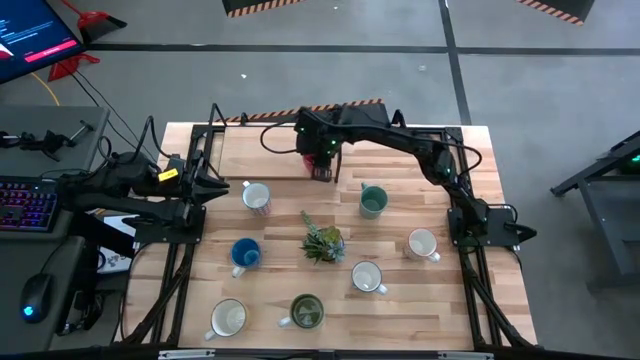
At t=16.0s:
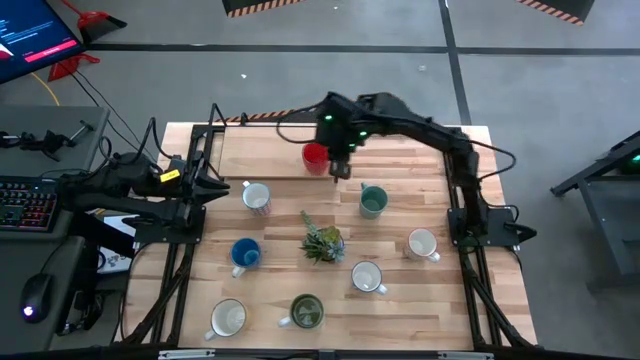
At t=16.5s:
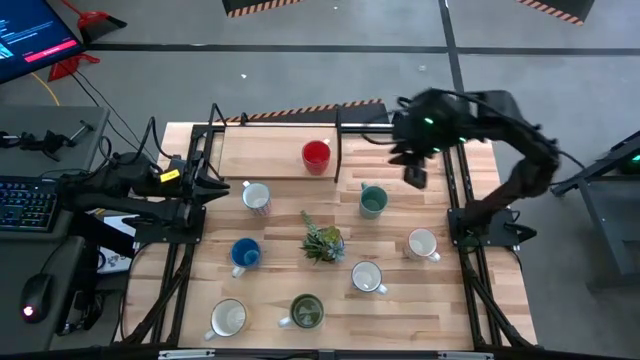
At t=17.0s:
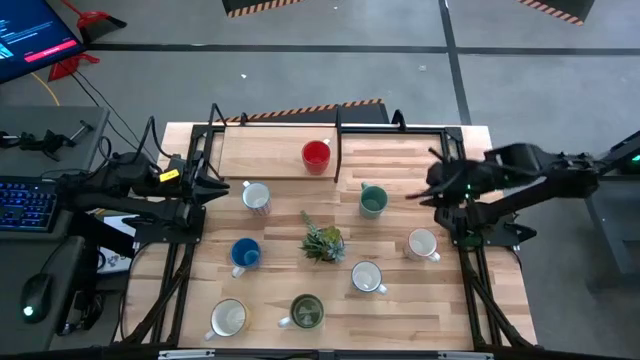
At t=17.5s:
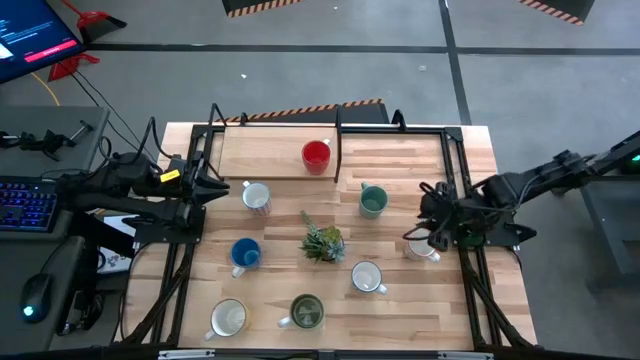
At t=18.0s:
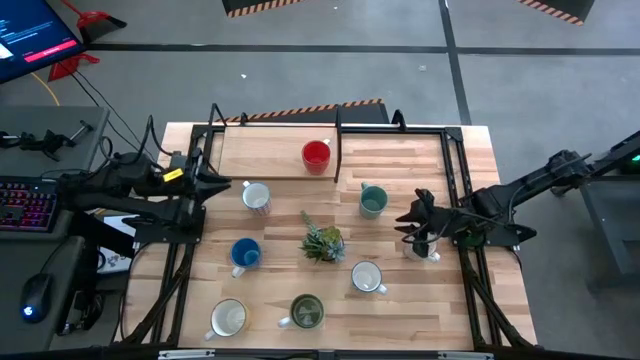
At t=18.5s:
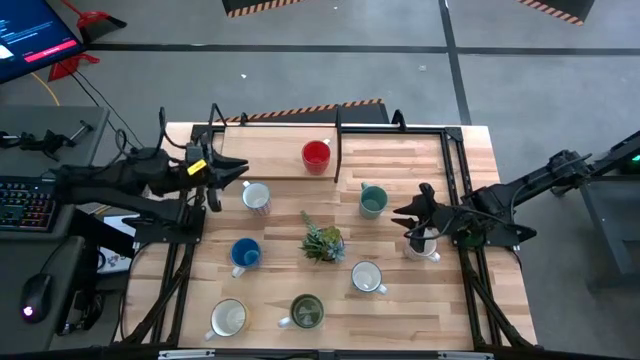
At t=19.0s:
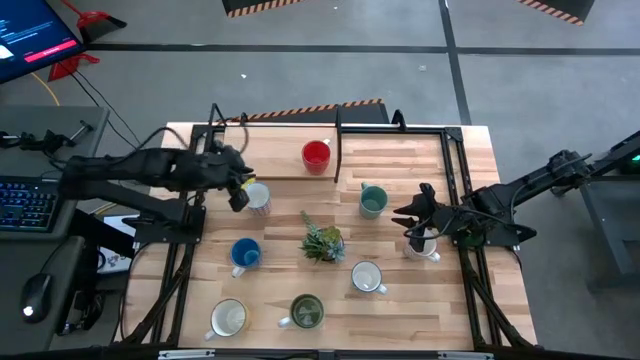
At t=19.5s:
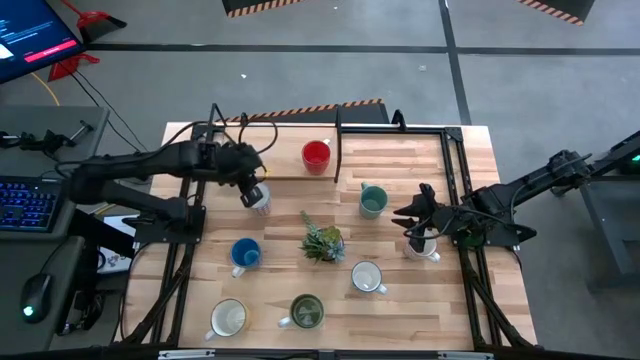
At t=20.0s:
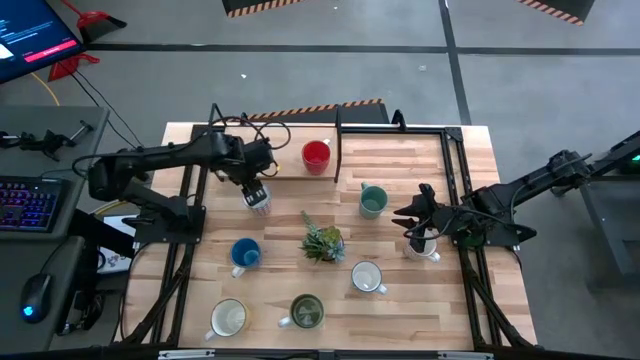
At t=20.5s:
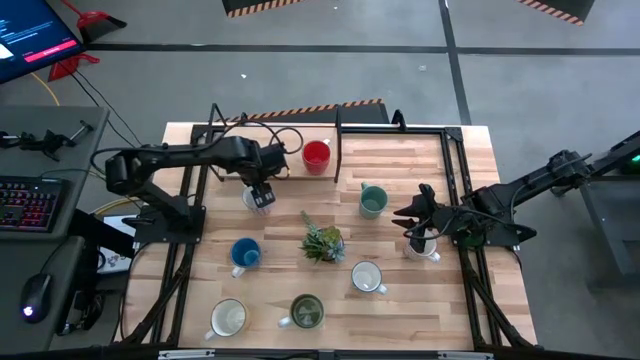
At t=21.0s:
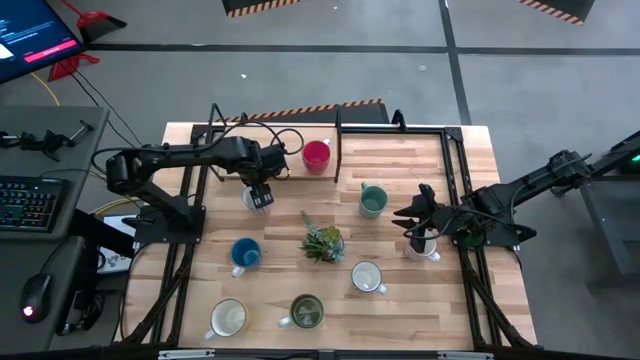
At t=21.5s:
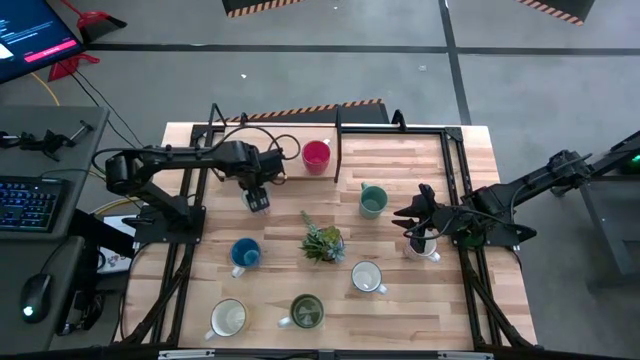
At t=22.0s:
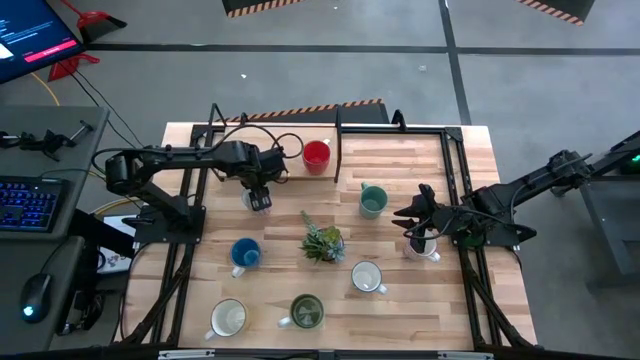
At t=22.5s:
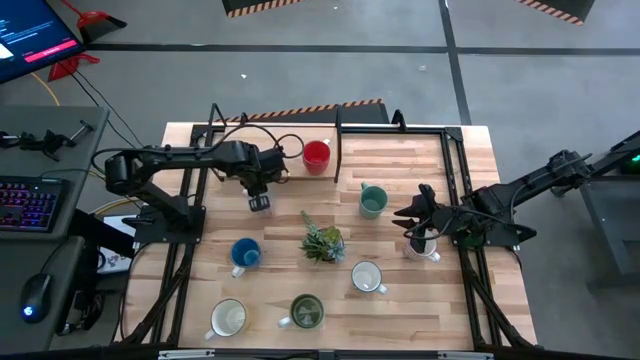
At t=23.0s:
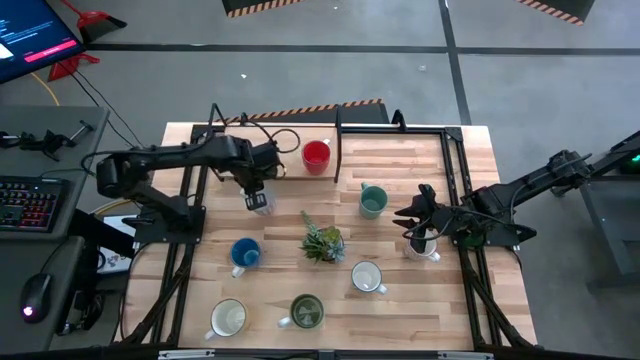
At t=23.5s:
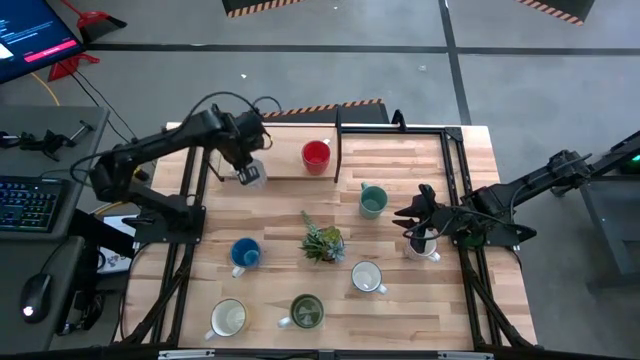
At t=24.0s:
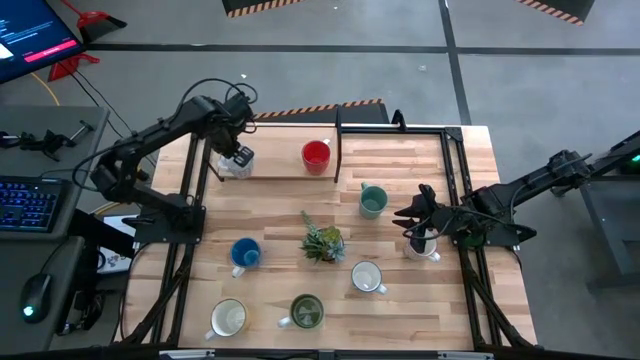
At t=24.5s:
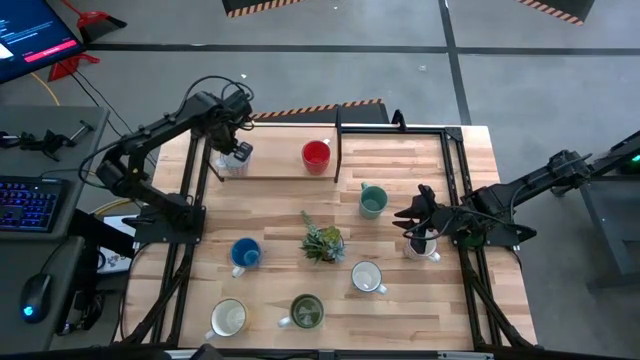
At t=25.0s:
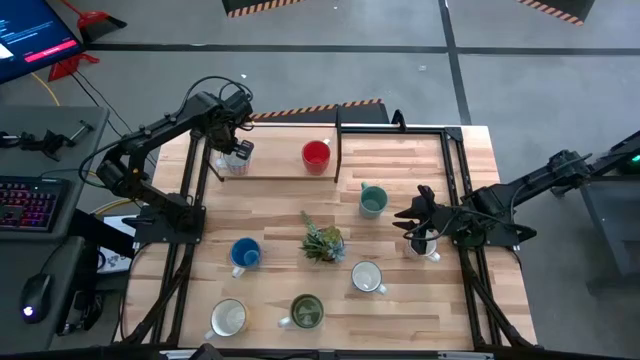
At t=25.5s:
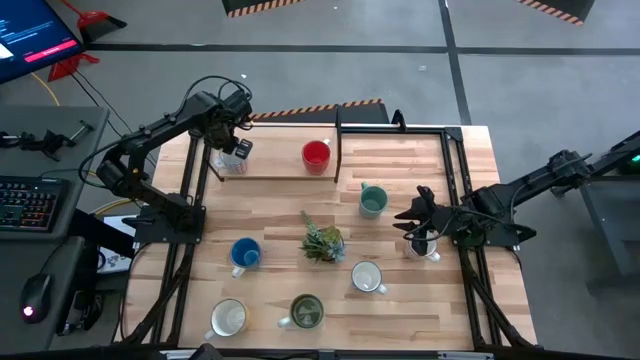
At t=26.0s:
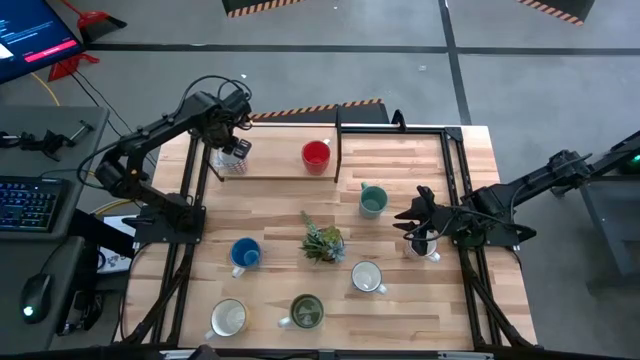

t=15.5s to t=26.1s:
Task: Place coffee mugs
Put the red patterned mug on the shelf

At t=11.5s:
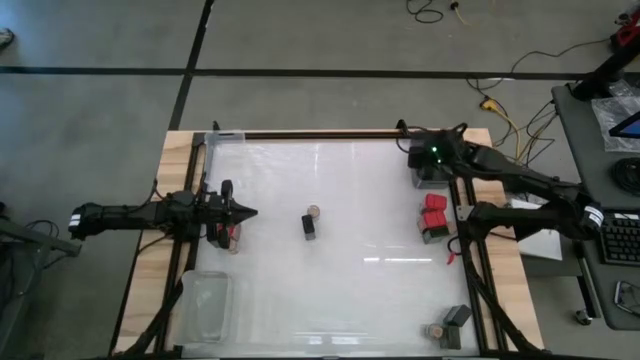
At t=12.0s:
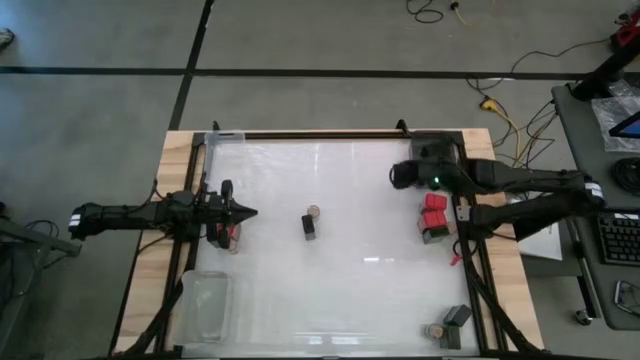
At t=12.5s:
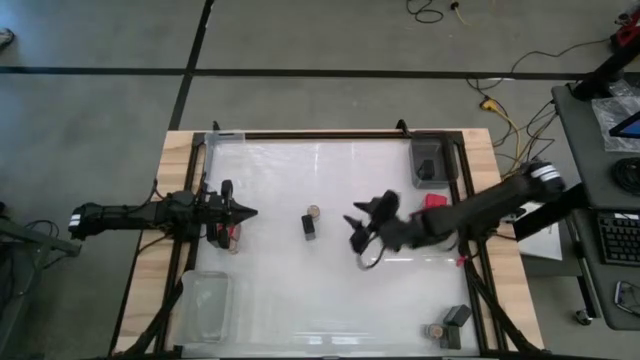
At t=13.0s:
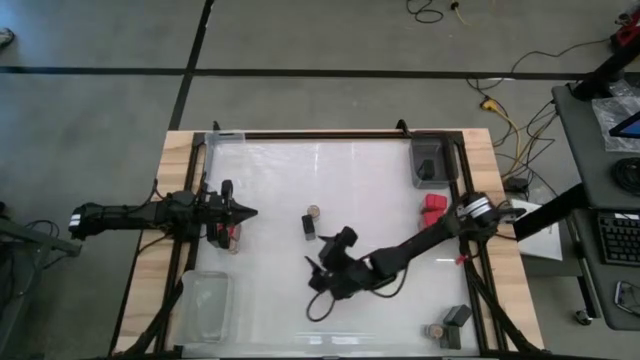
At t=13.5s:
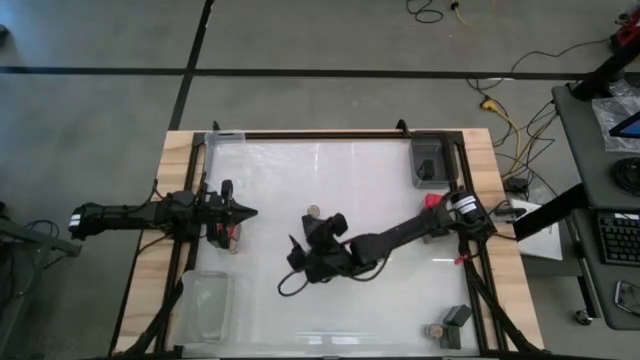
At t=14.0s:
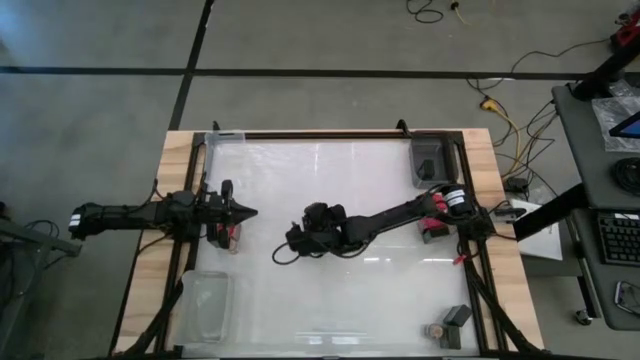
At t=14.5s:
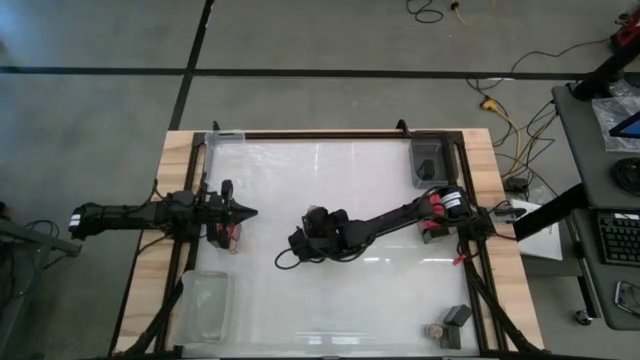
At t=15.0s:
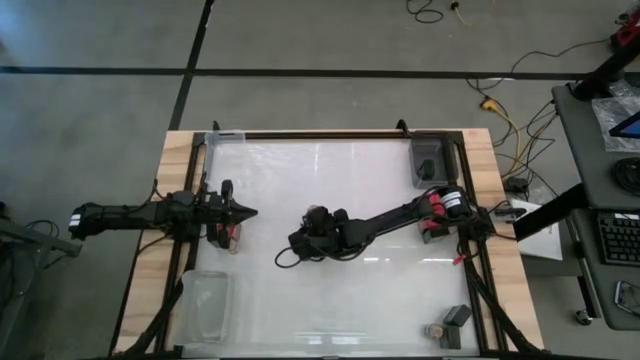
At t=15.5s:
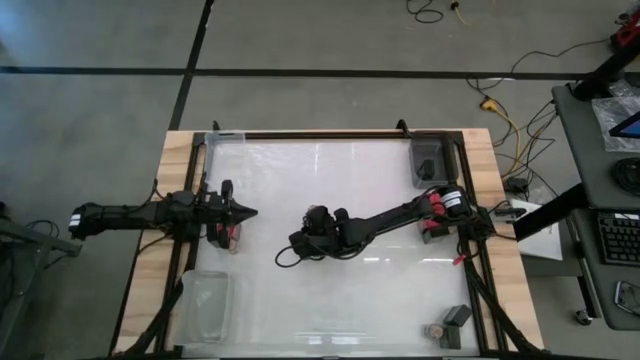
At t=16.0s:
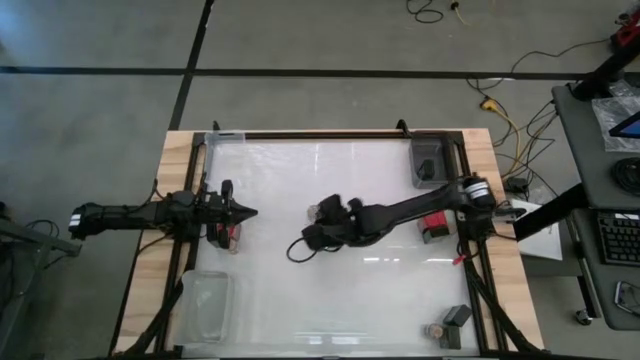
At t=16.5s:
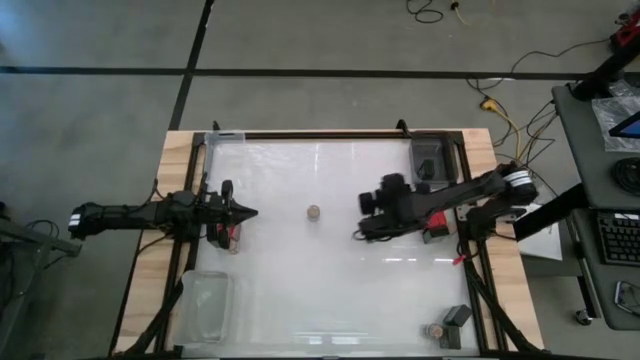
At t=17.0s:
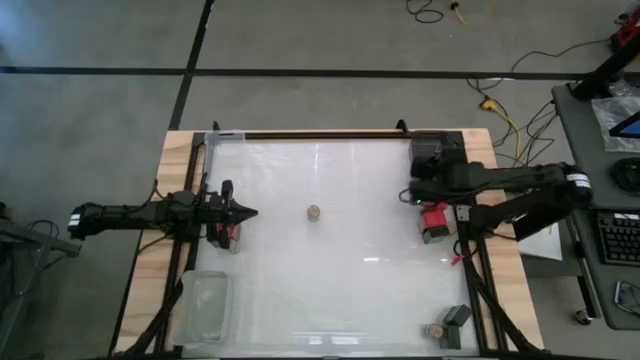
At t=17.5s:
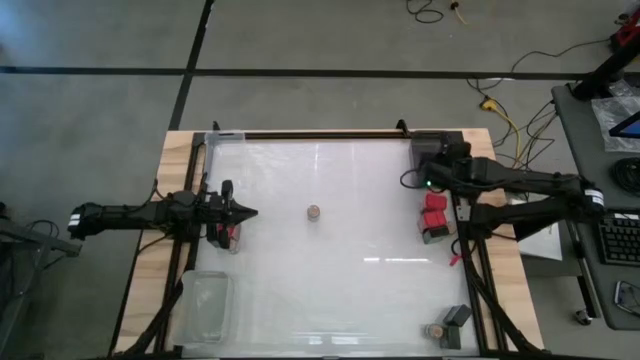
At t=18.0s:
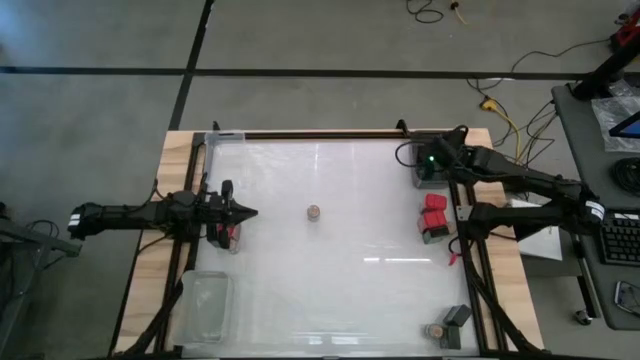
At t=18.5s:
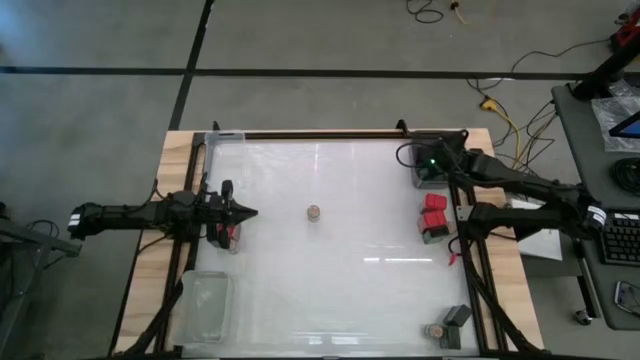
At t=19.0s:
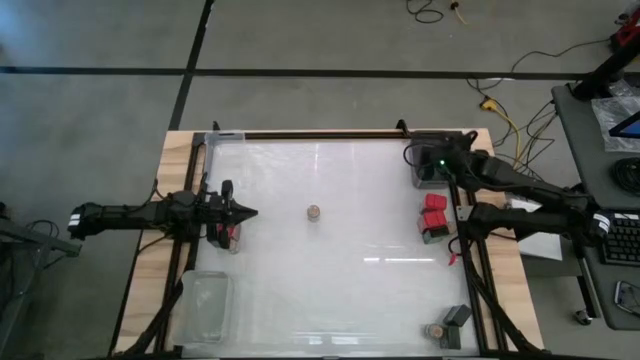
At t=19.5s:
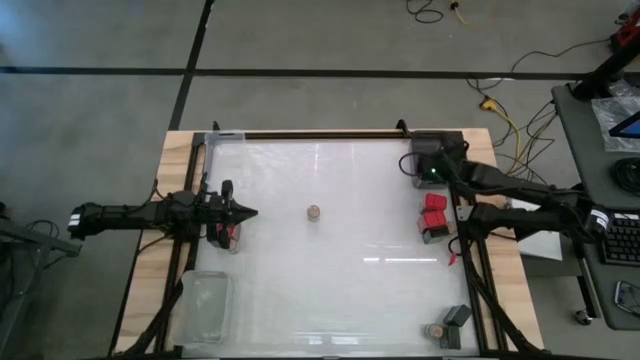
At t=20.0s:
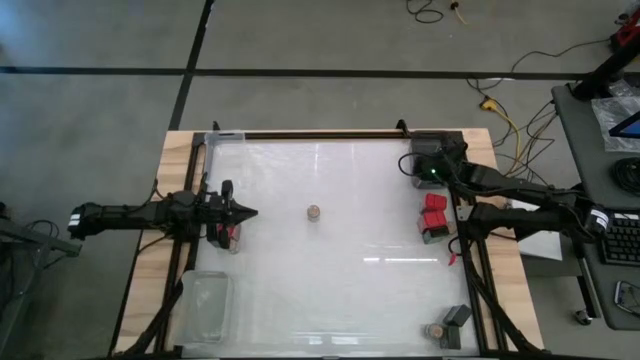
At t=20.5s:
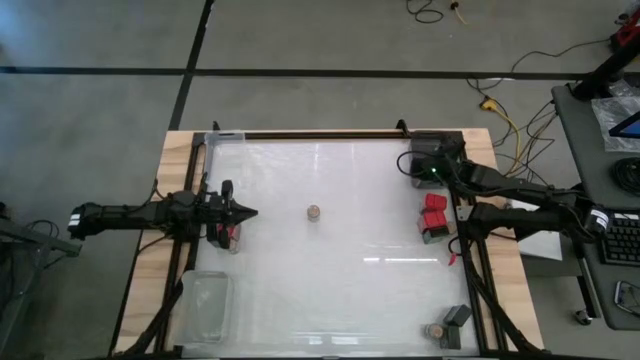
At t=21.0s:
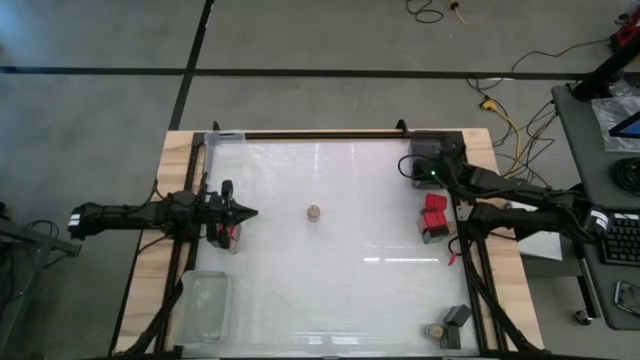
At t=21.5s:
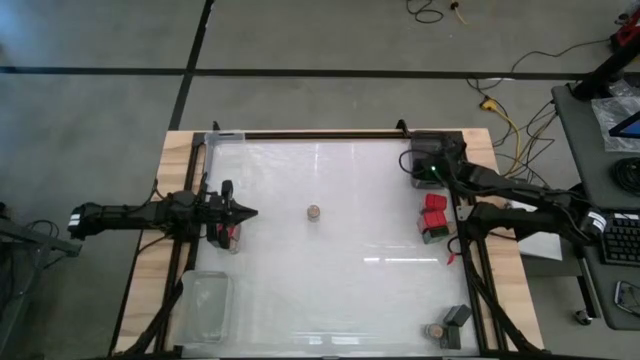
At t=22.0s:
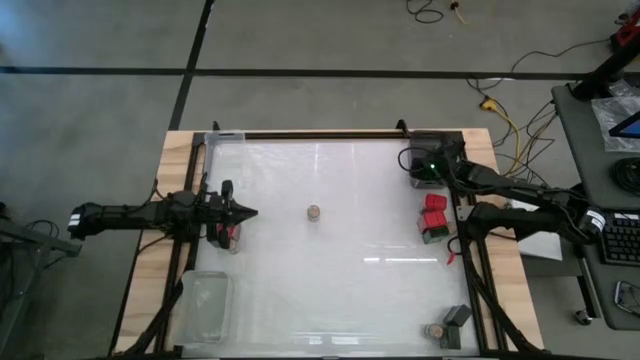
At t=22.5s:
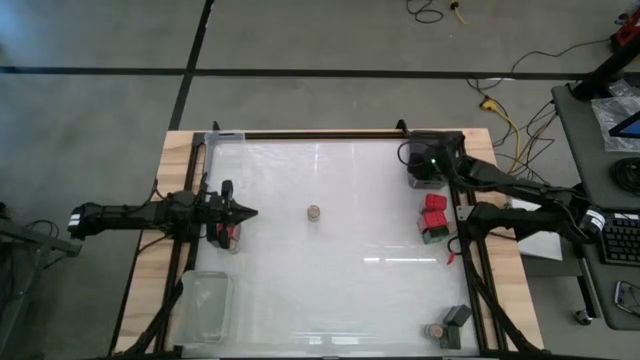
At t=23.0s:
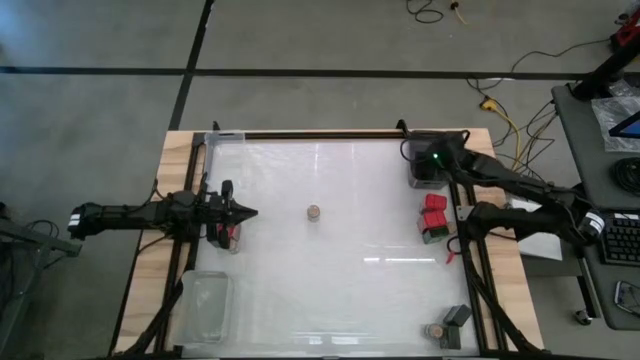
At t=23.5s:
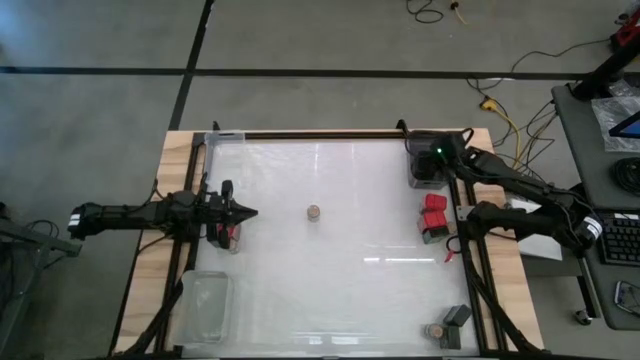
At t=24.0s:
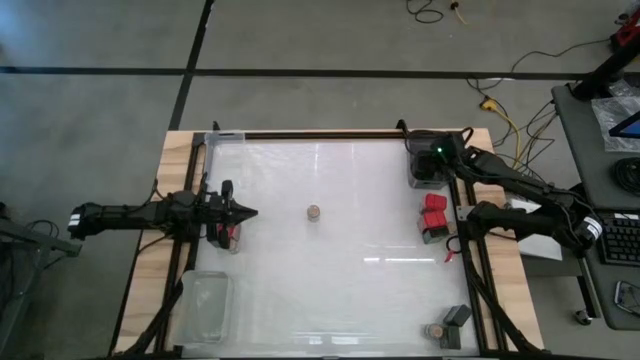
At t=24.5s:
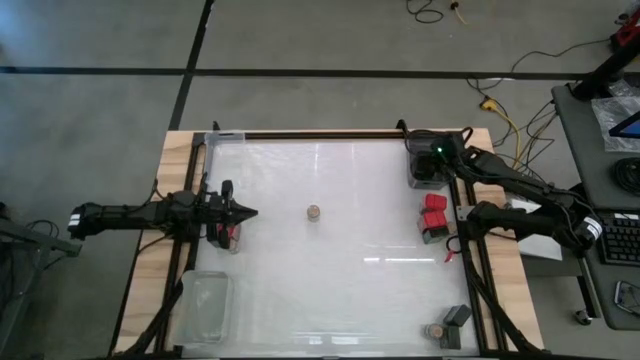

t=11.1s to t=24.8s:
Task: Sort spices by type
Put the black seasoning can into the black bin
